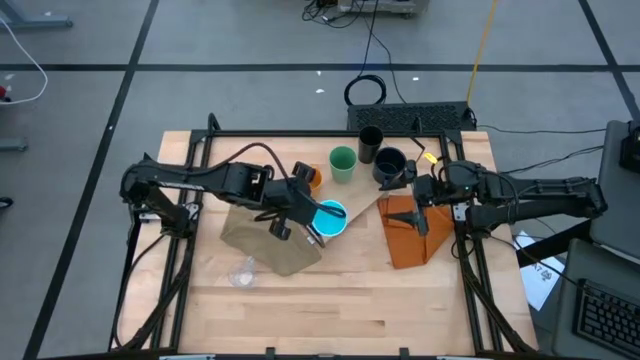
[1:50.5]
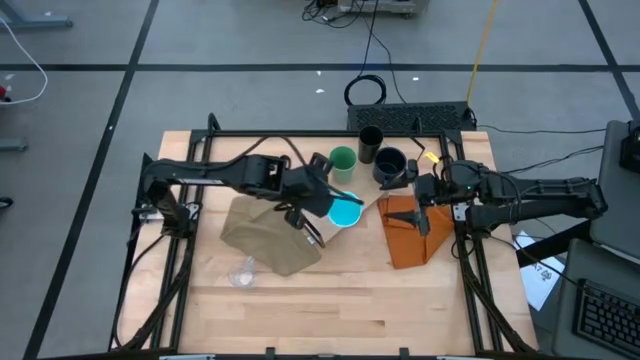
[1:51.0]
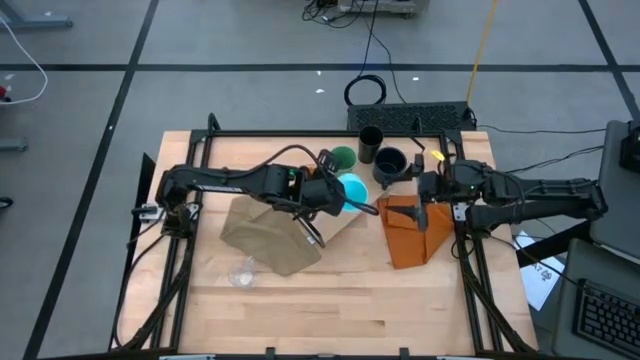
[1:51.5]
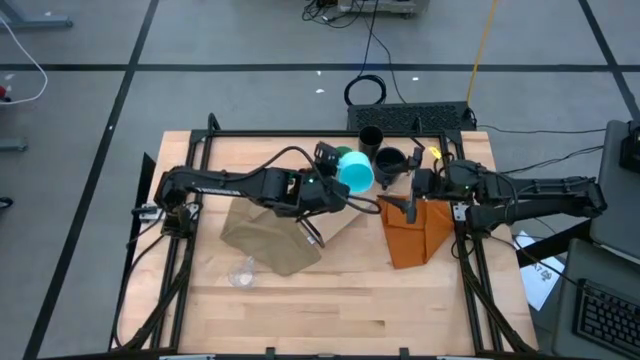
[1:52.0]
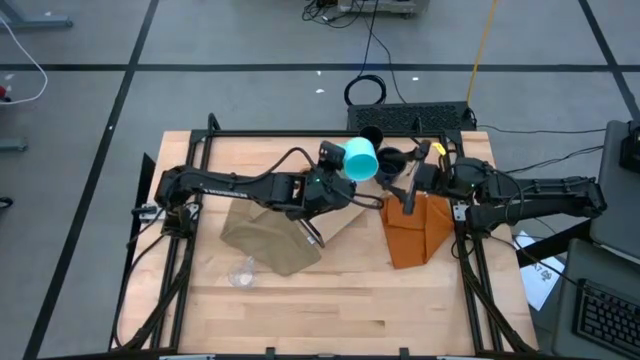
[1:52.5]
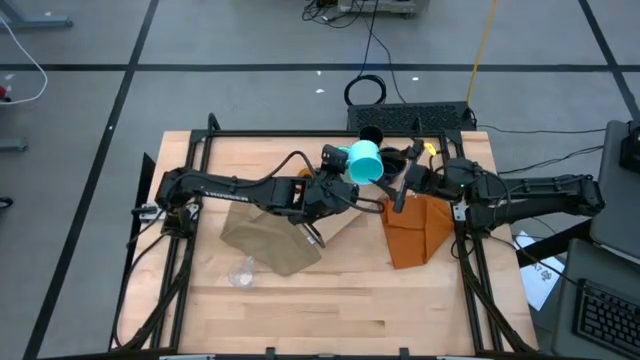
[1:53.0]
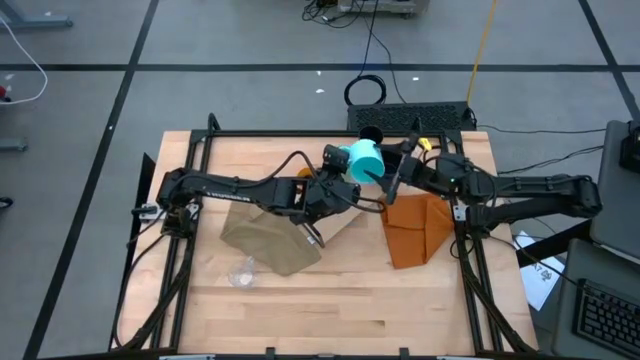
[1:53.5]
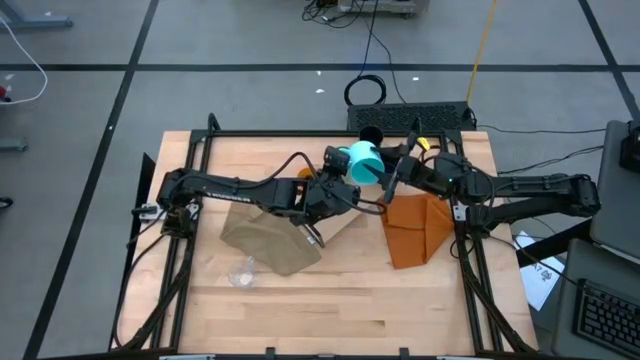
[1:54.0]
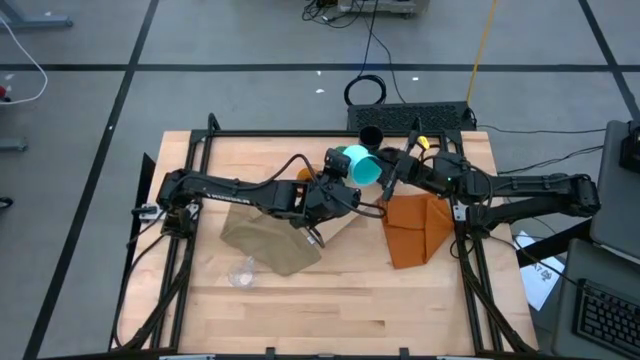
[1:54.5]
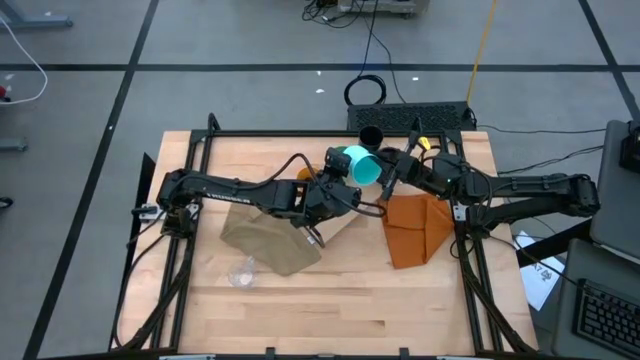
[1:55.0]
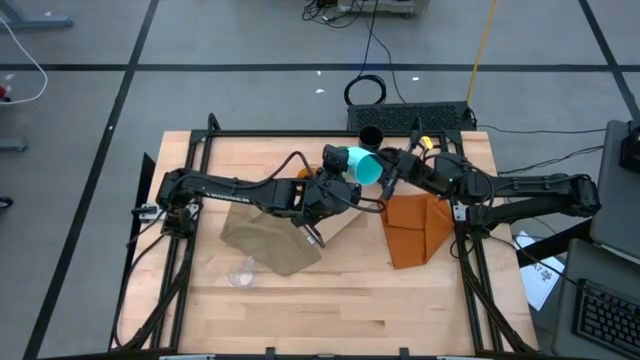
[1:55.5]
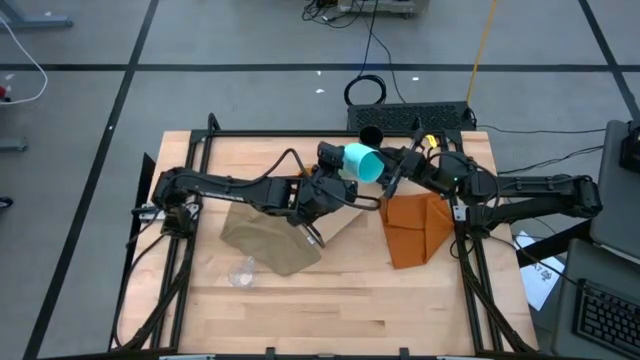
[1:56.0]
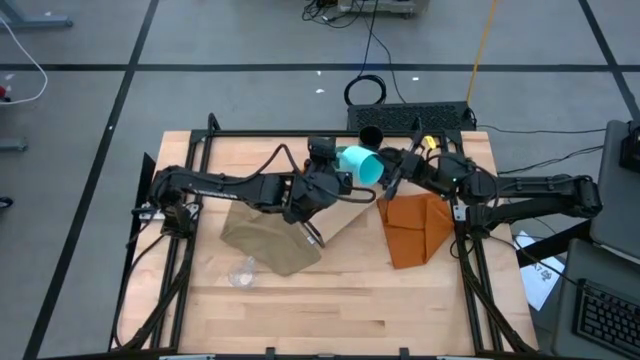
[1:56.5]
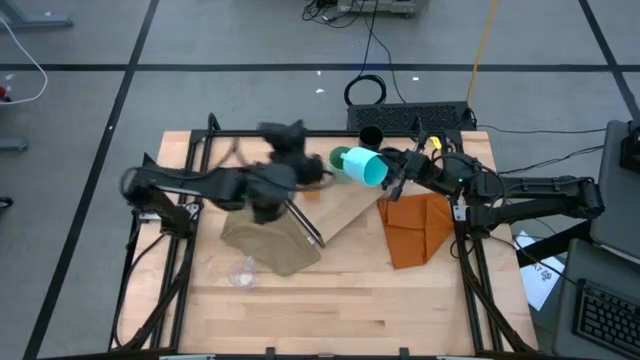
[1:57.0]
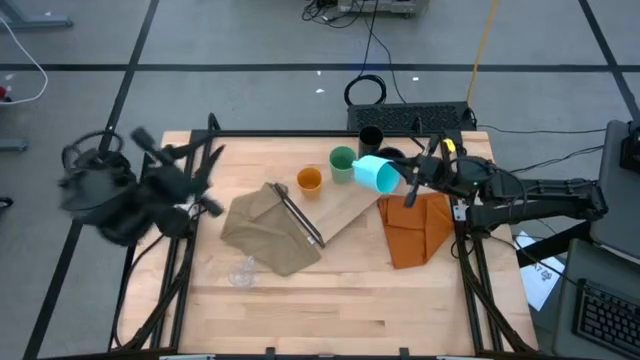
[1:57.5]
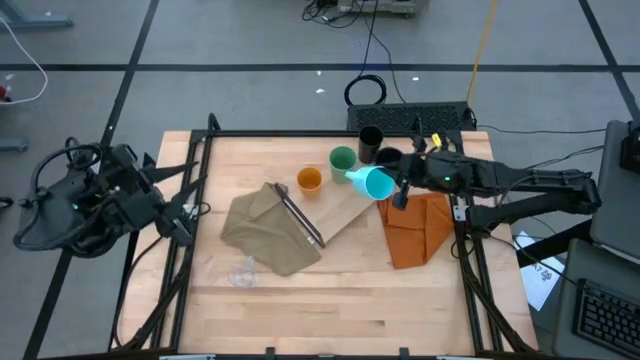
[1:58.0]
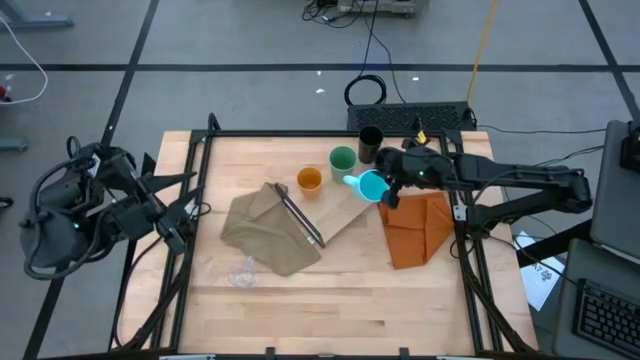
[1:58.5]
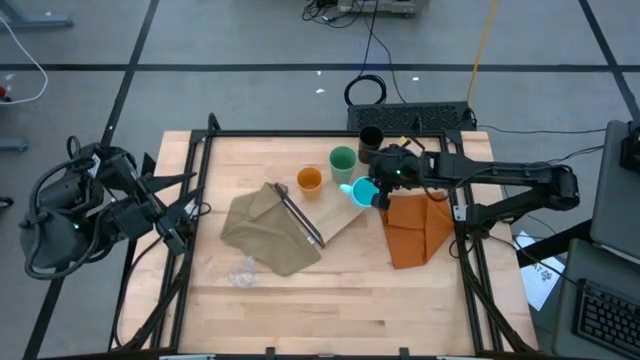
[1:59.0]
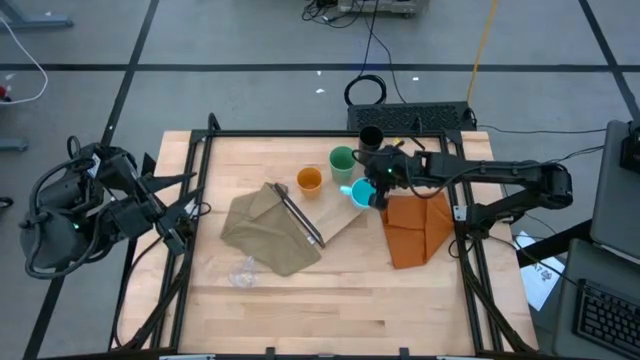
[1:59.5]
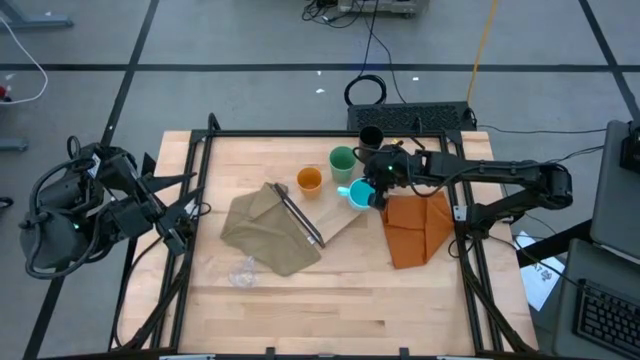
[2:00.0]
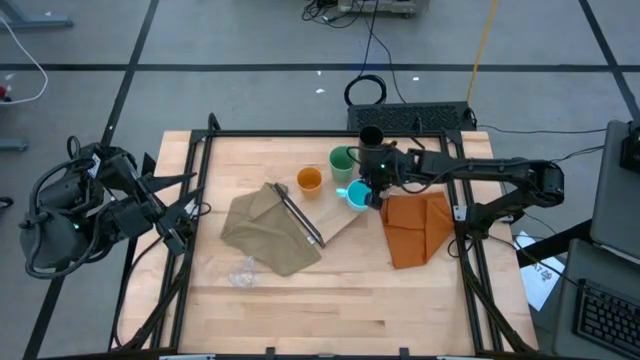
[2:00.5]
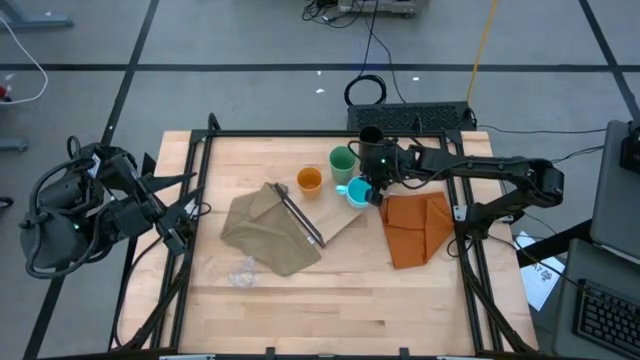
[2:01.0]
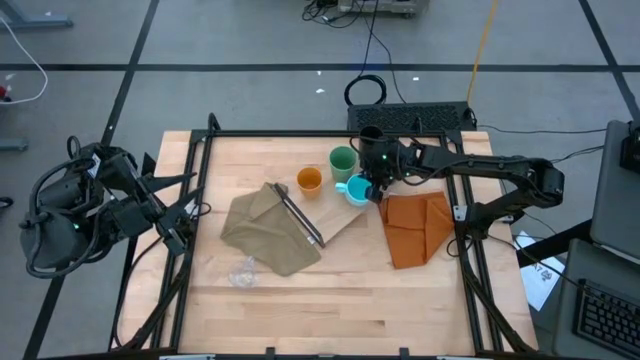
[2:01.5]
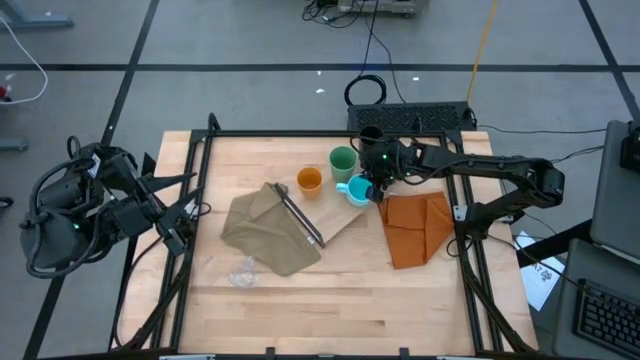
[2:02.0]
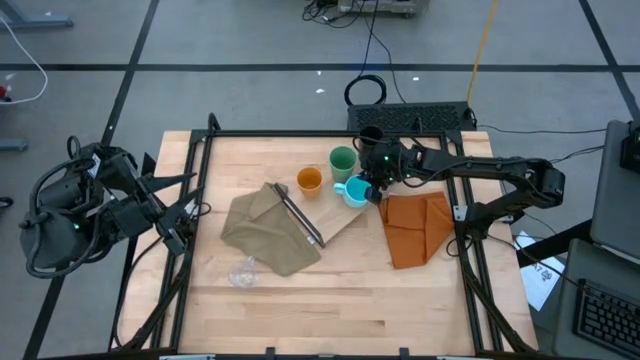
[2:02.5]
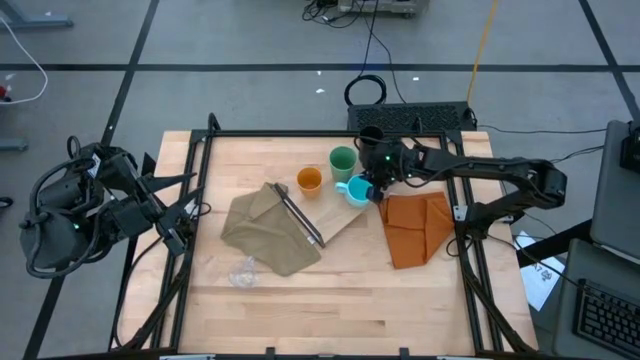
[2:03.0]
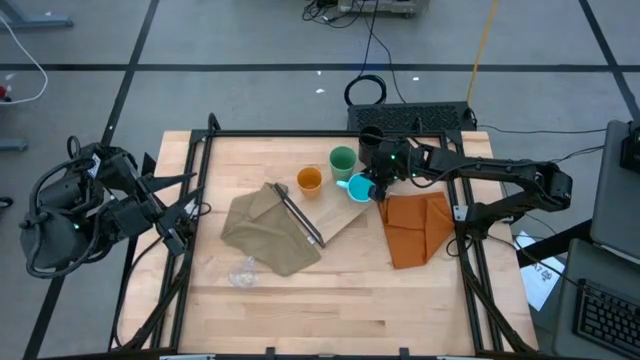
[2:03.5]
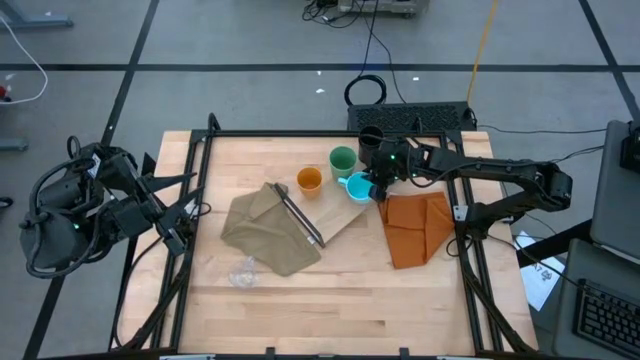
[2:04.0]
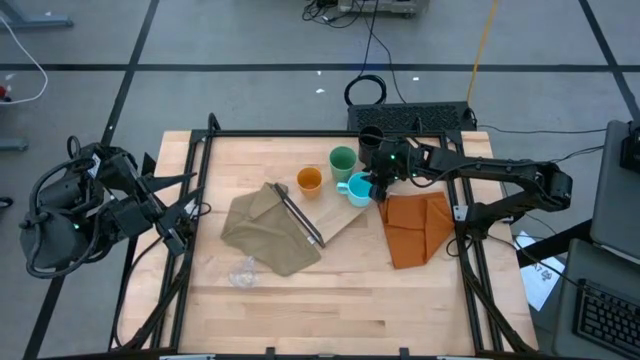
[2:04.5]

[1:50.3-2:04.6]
Task: Stack small to large cups/mugs on shelf
Put the light blue mug on the shelf

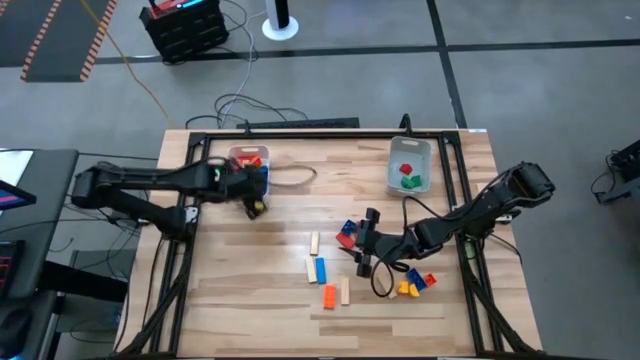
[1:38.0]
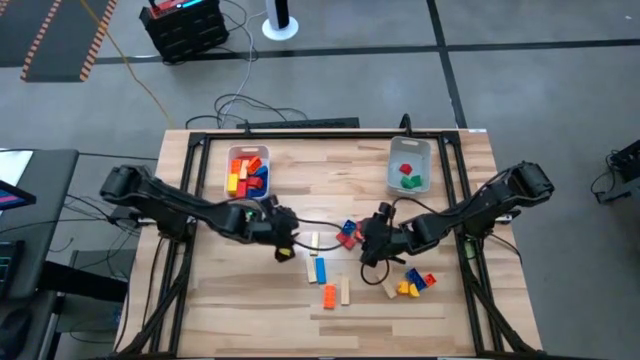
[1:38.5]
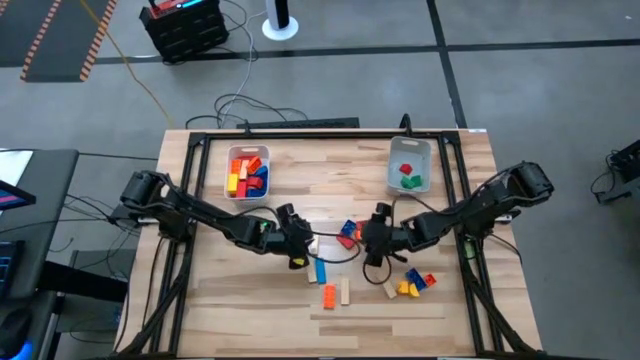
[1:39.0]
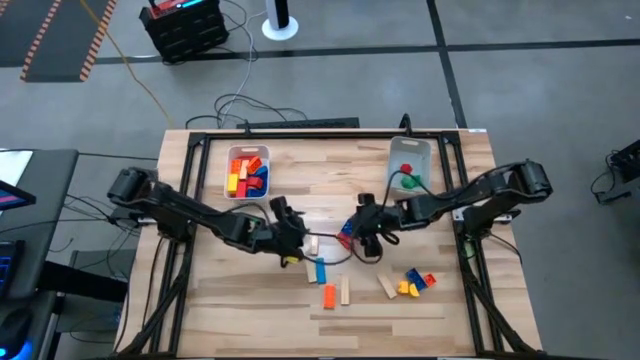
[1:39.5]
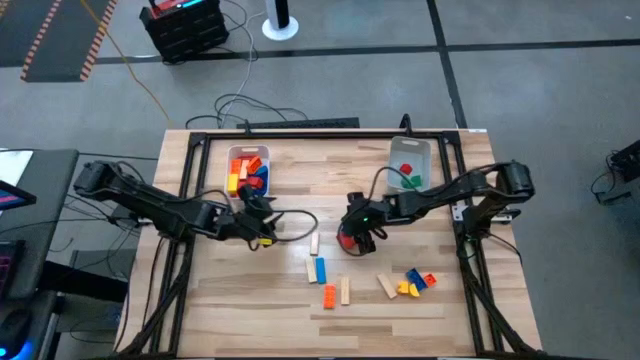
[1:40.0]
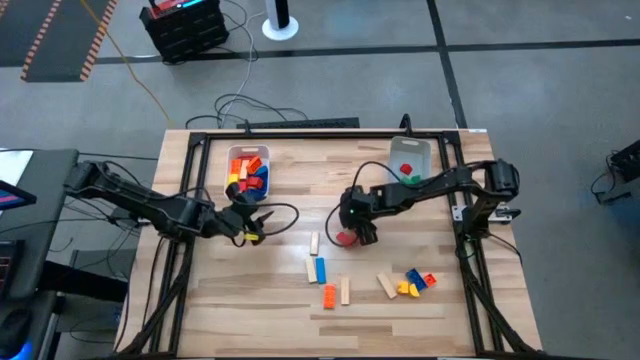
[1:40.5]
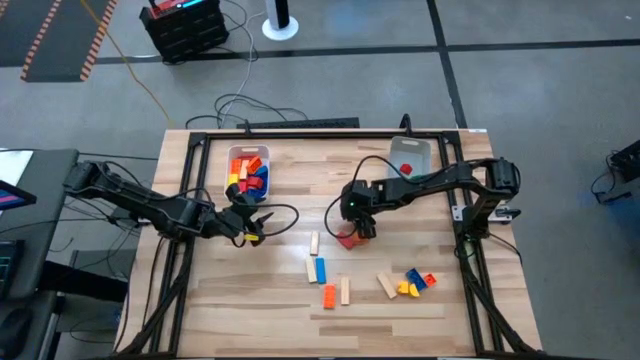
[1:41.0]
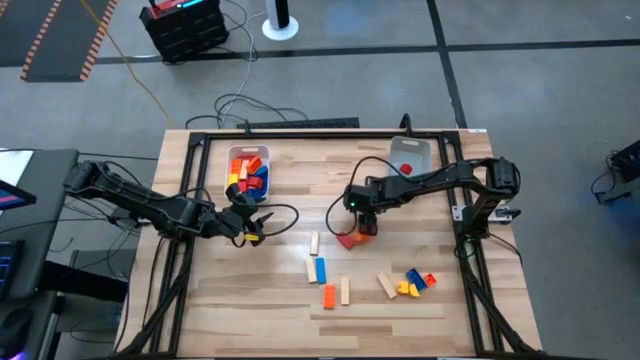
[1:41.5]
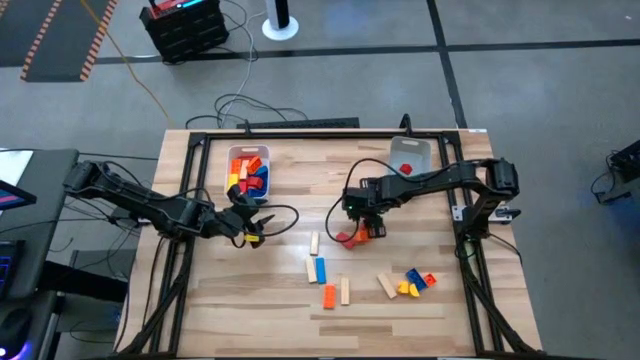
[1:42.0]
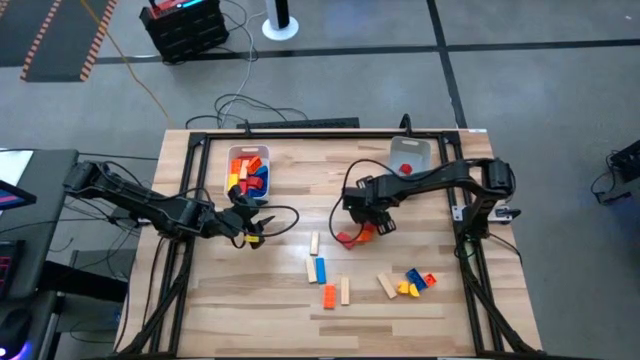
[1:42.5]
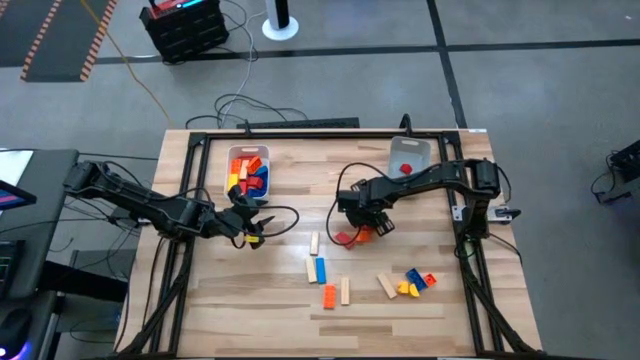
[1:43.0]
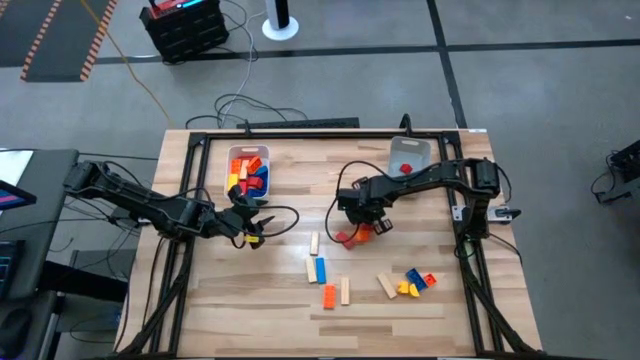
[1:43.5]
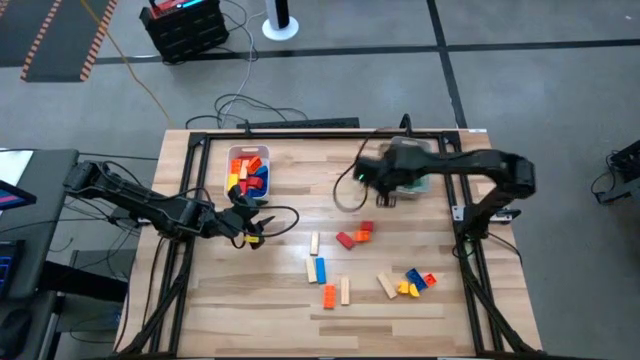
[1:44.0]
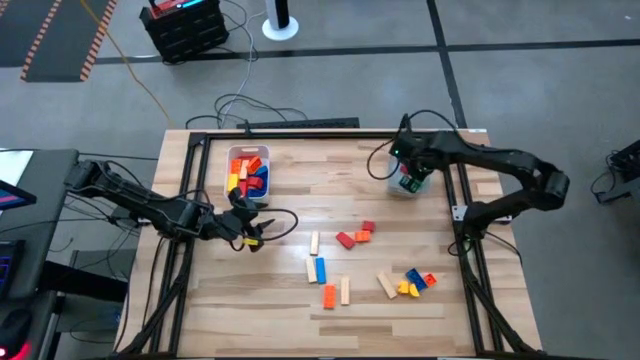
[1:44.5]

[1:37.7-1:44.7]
Task: Sort blocks by size
Put the small blue game piece into the gray bin
